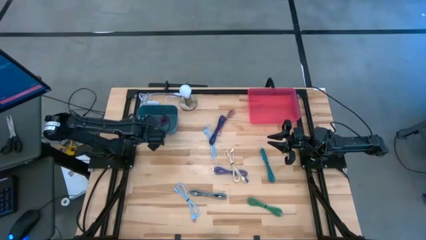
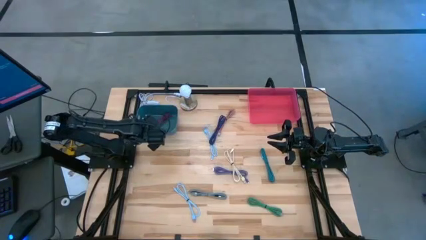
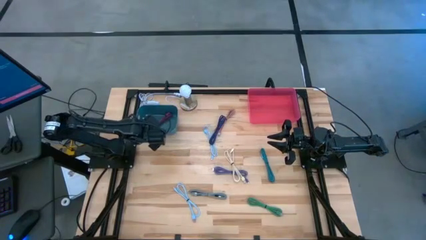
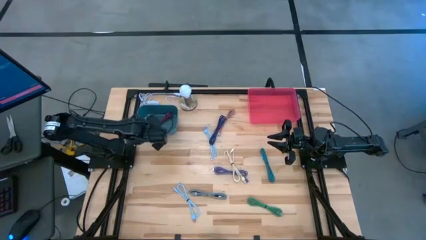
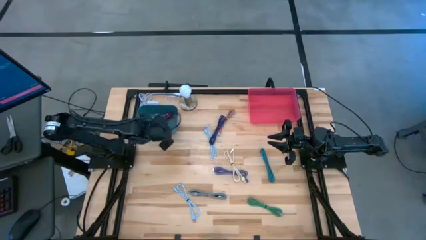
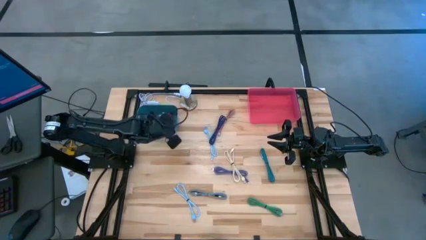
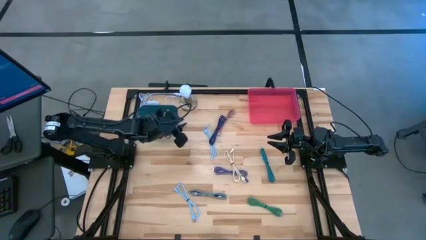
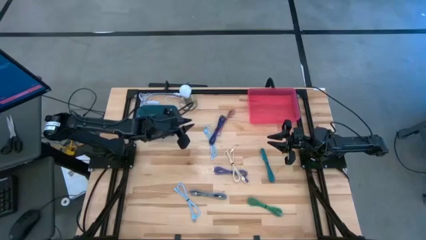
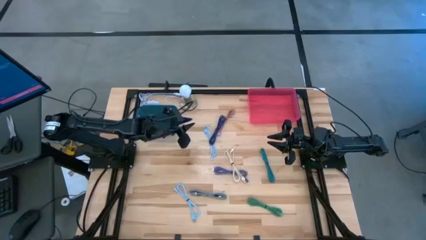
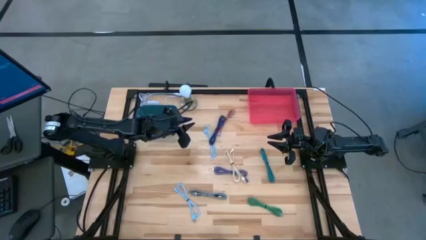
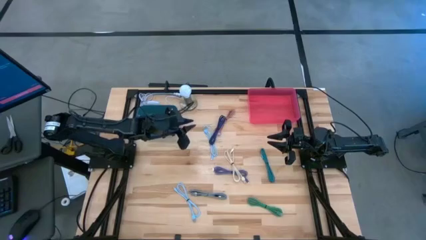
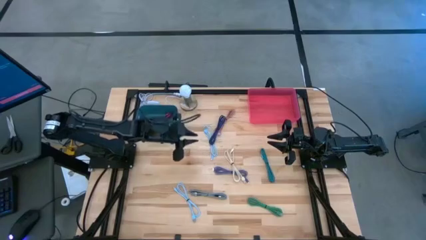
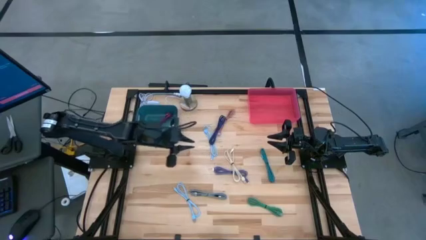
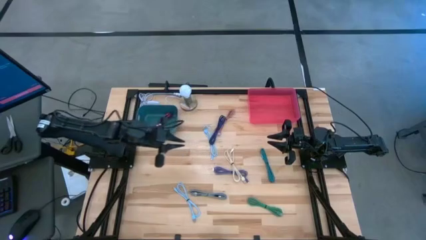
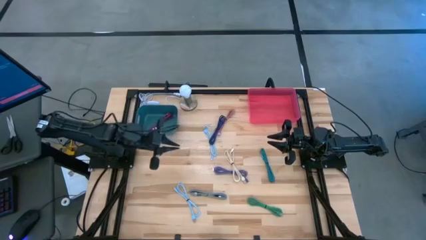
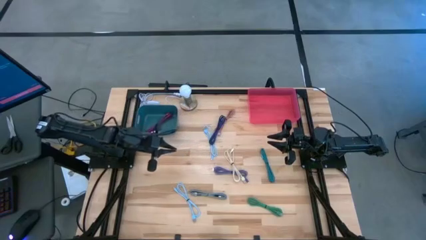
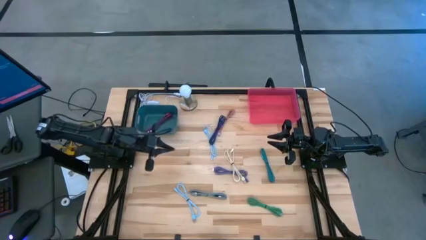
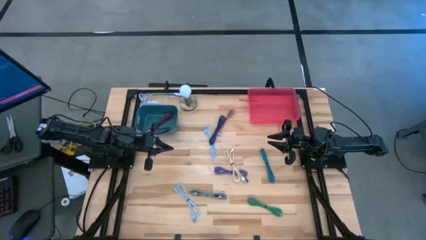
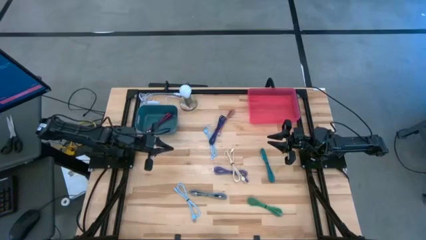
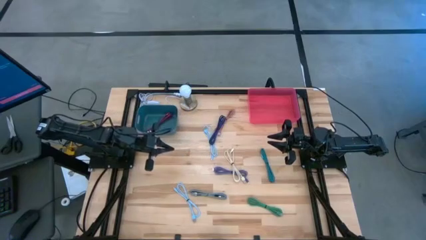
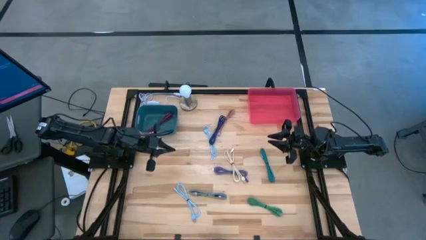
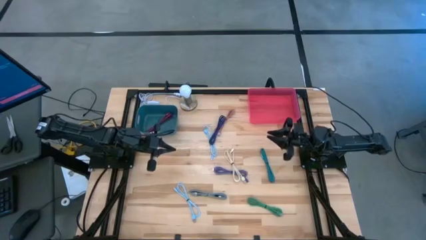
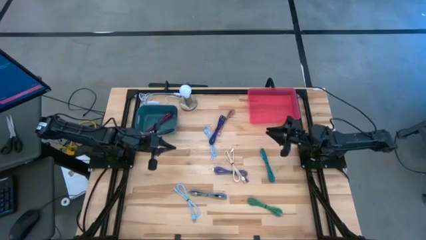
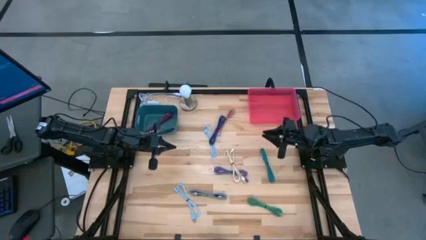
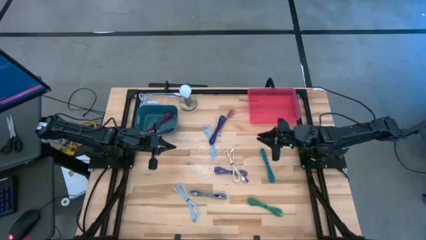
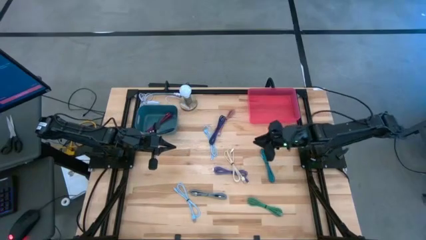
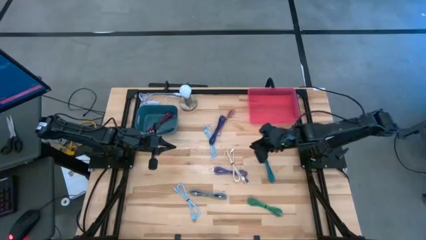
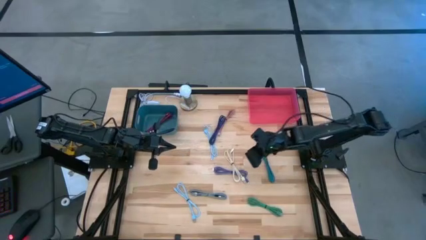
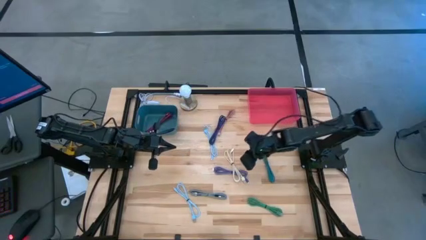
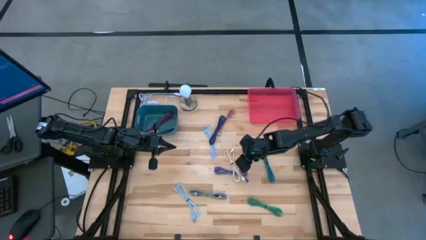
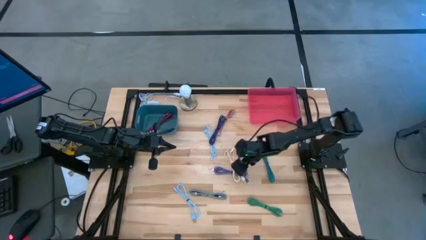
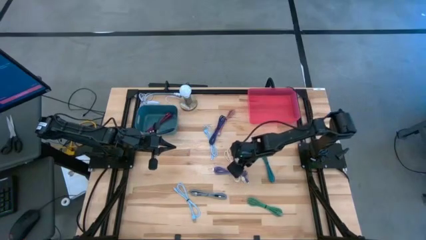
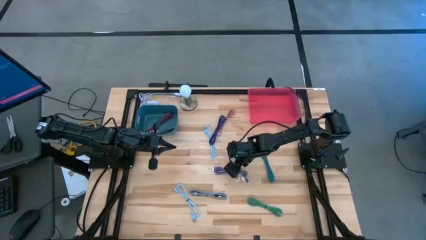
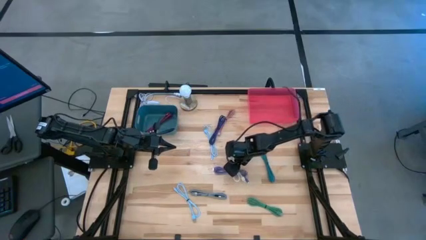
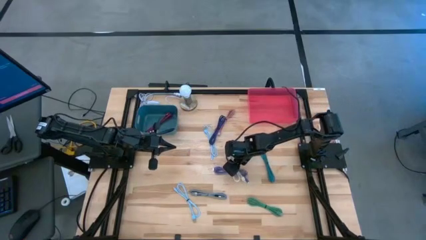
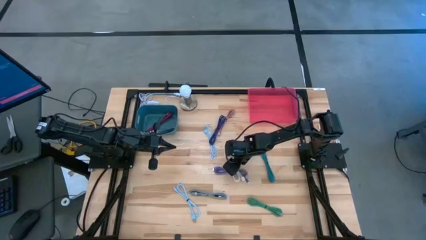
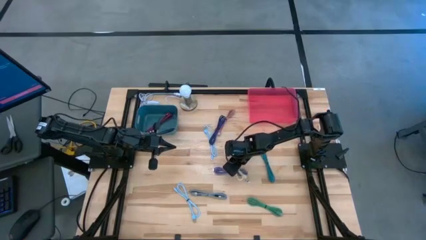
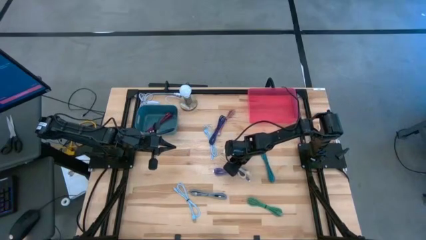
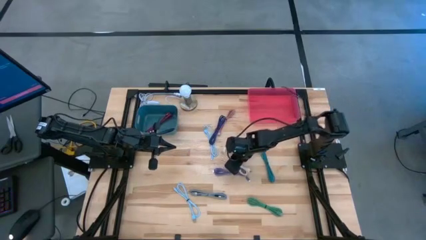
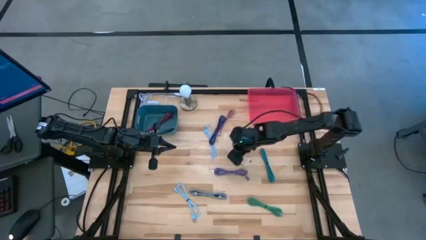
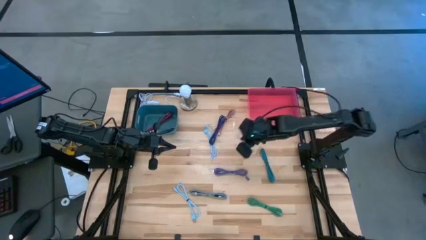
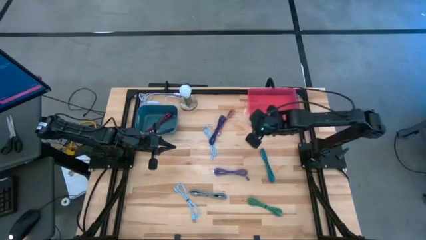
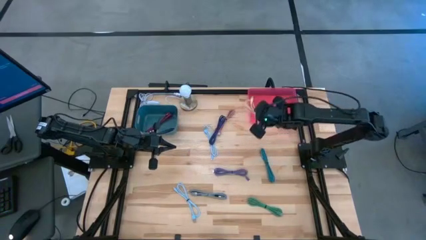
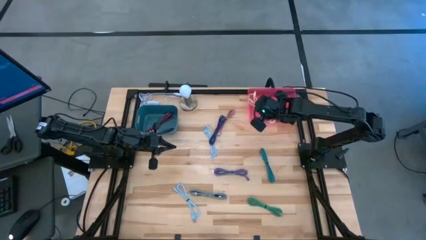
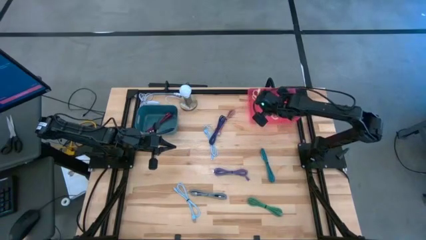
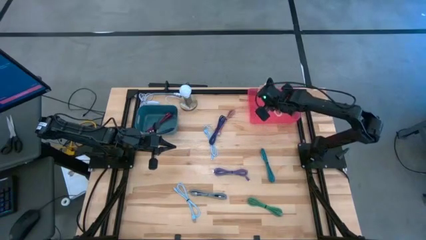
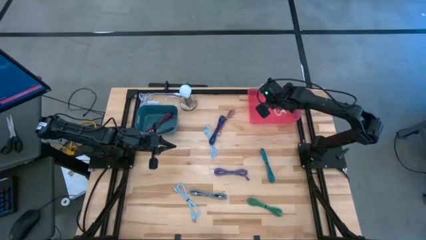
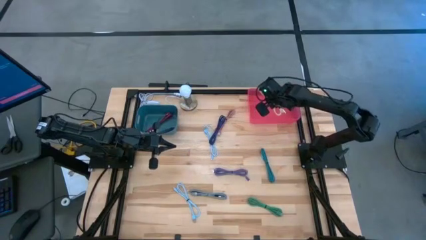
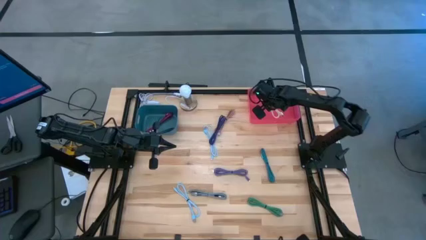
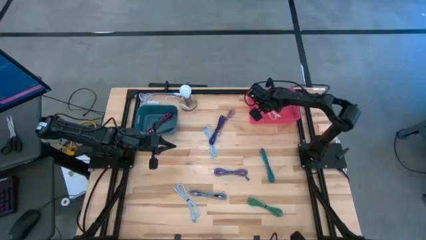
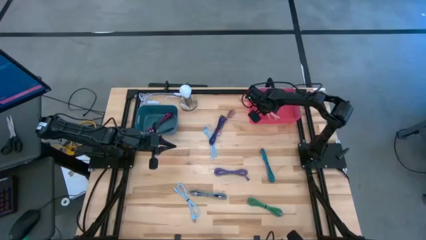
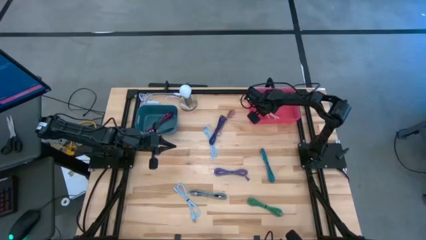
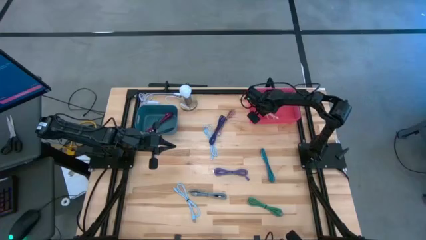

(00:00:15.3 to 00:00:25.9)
Task: Pick & Place USB Port
Put the plain white charger cable into the pink bin

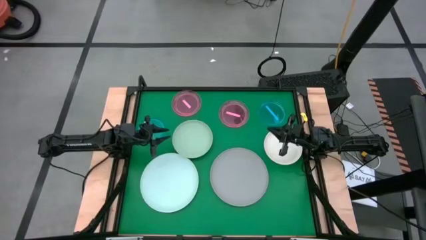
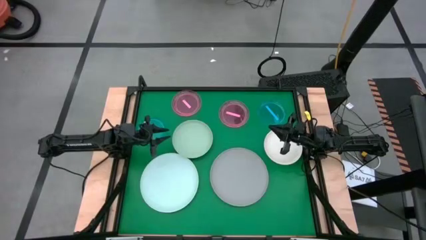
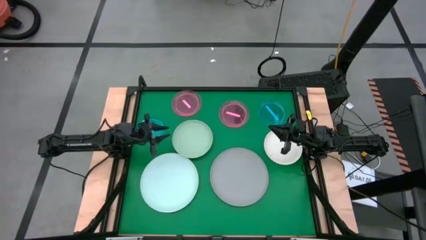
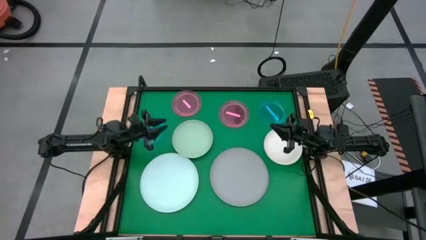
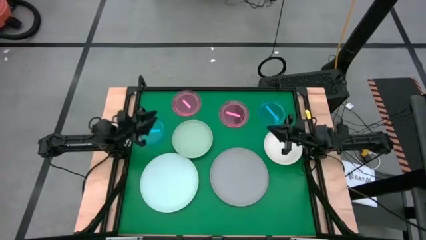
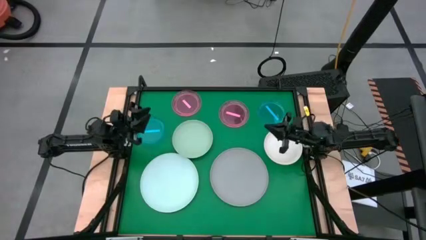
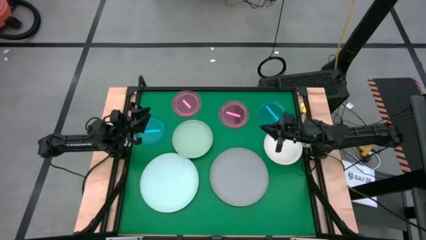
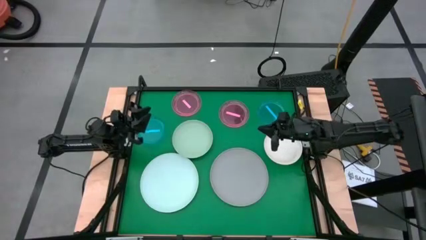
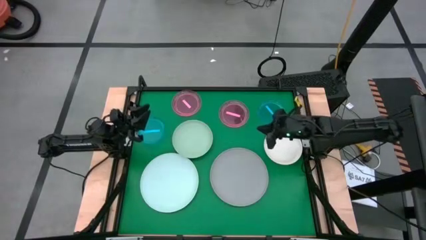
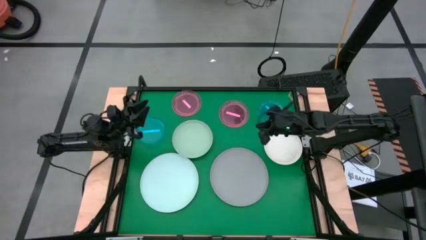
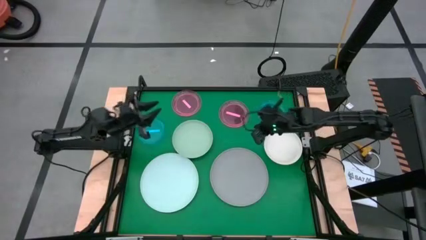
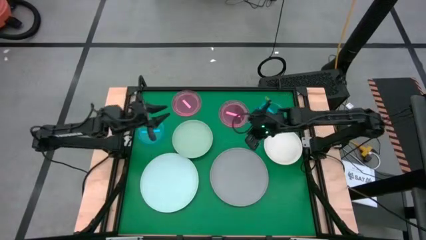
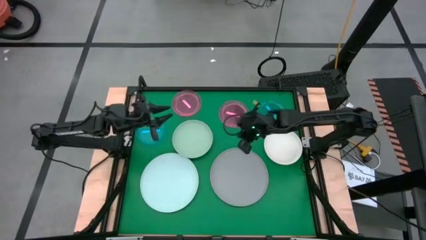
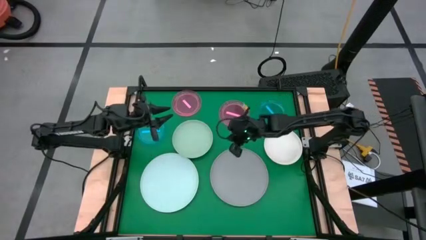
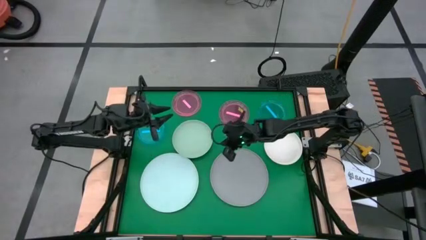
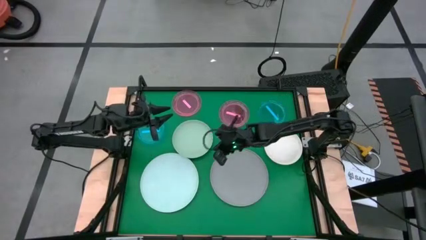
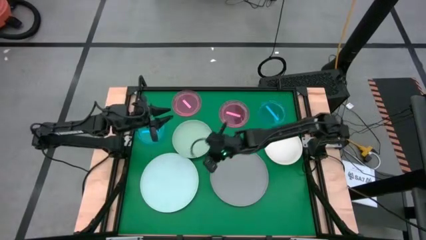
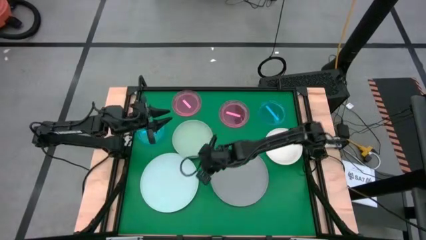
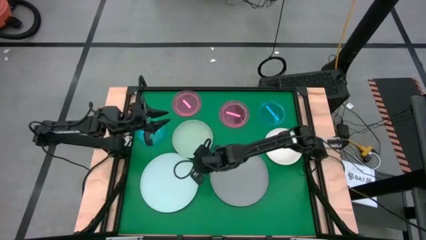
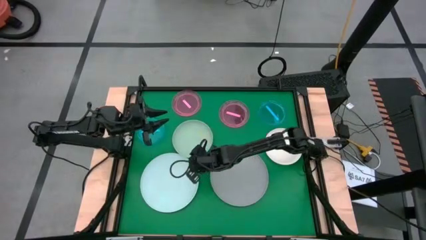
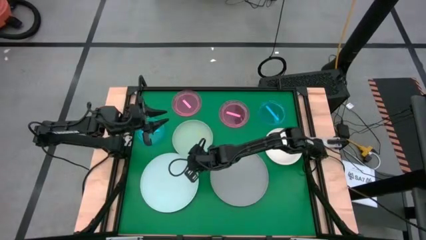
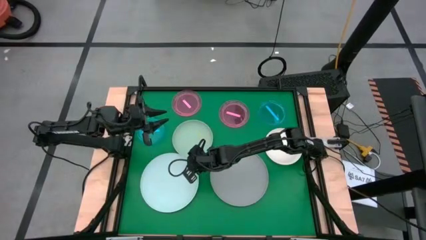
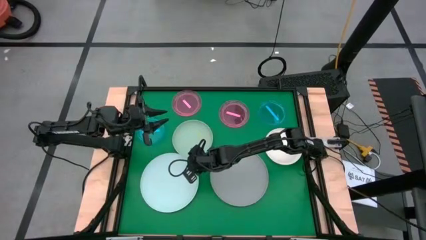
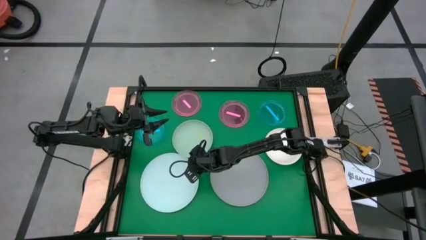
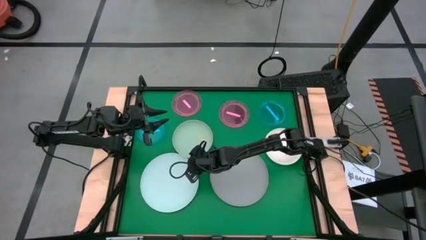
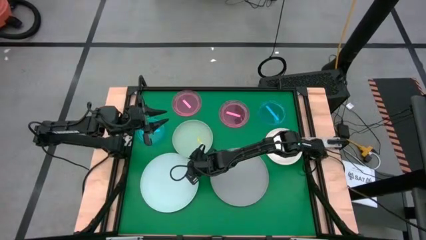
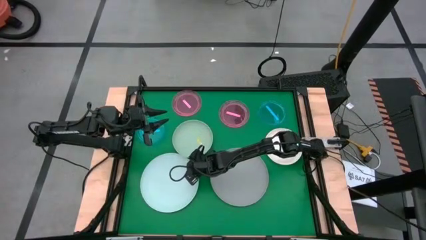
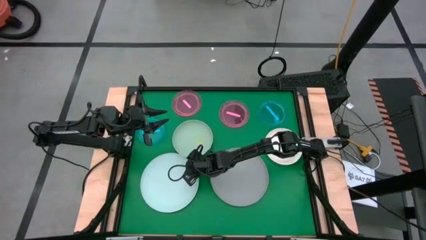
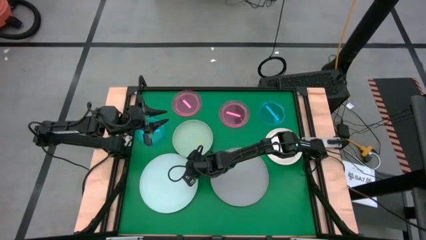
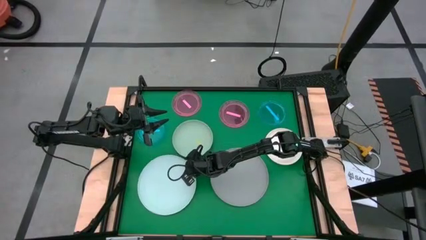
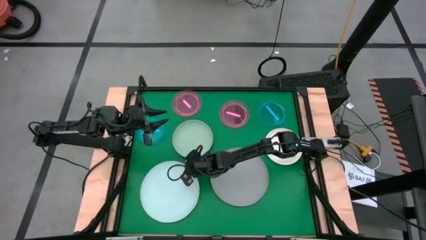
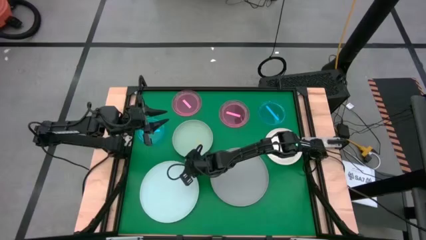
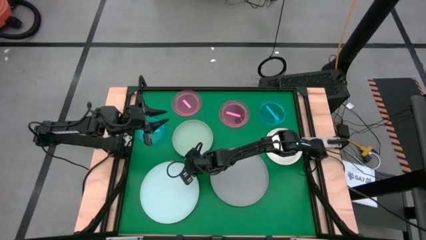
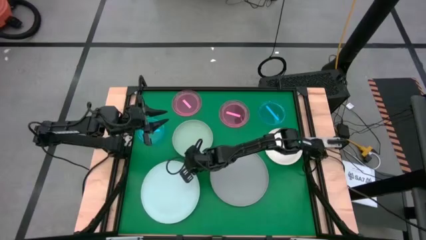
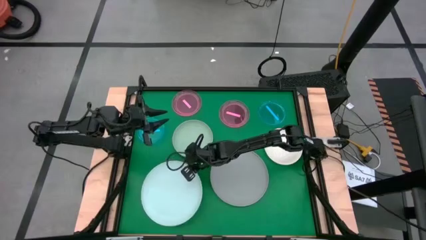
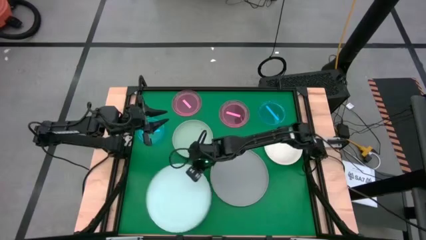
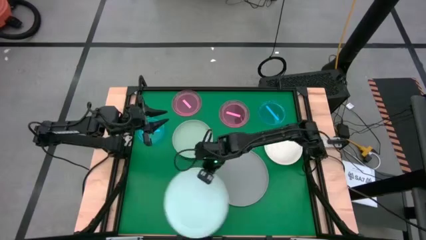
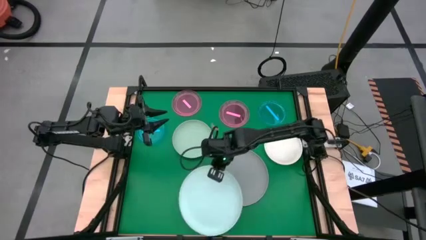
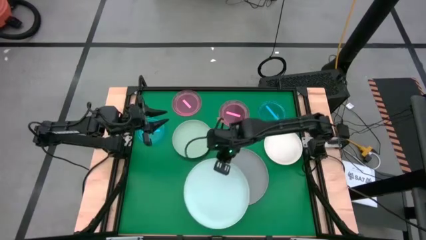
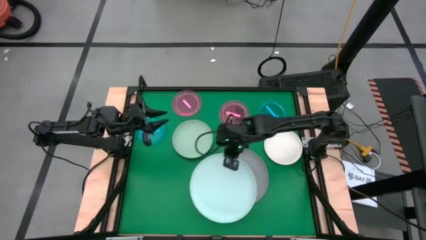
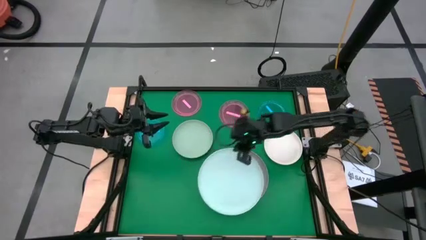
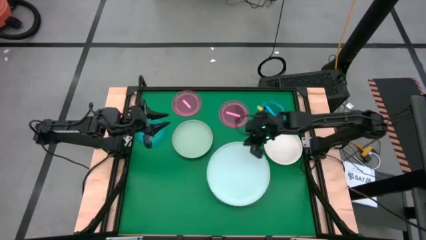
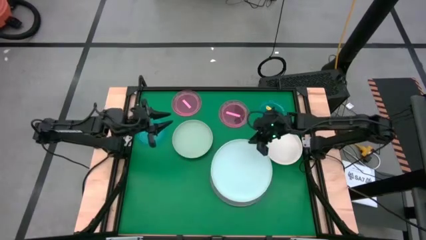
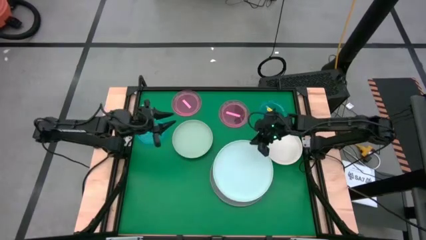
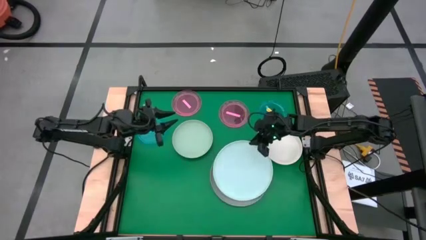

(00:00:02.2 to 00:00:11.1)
Task: Stack plastic plates
Stack the light blue plate on top of the gray plate
